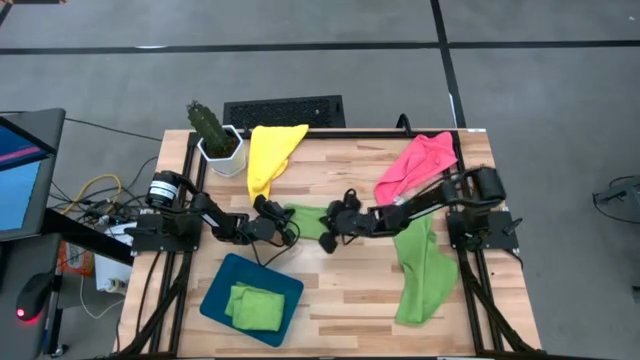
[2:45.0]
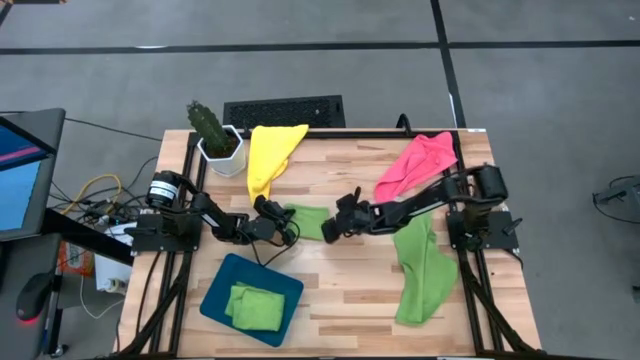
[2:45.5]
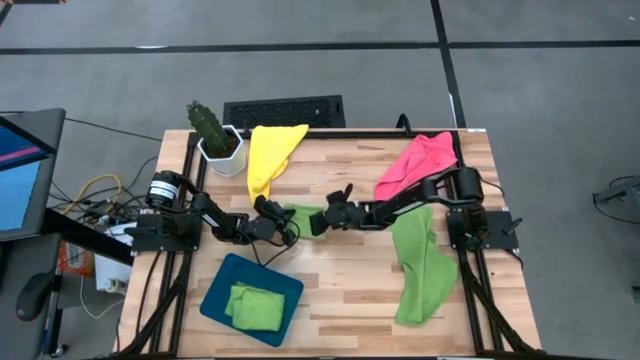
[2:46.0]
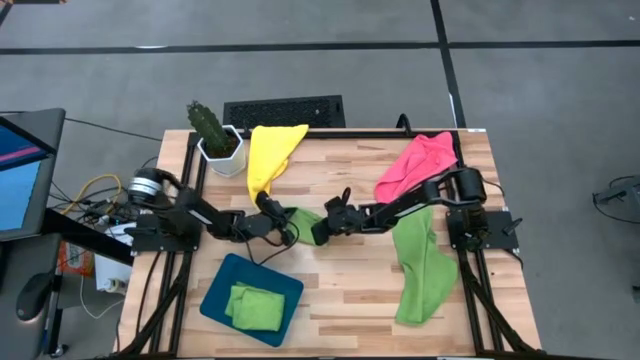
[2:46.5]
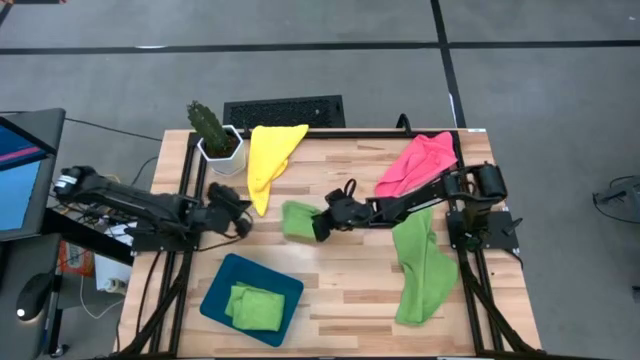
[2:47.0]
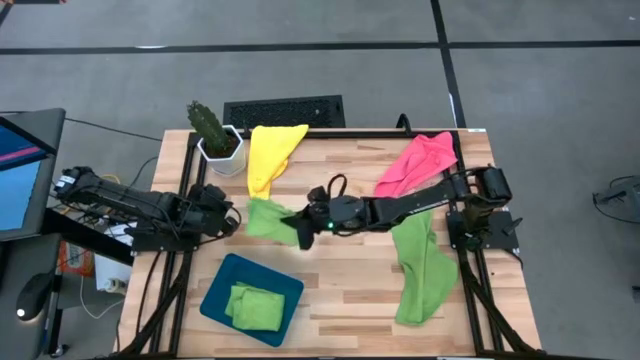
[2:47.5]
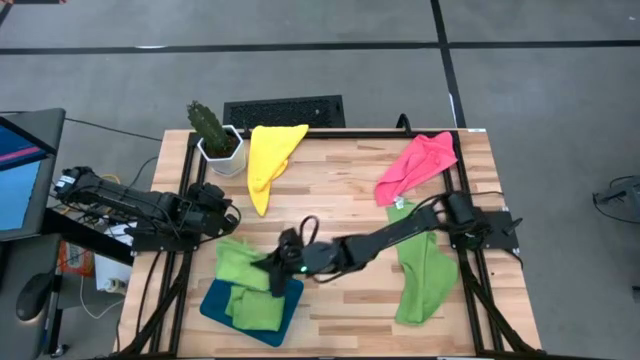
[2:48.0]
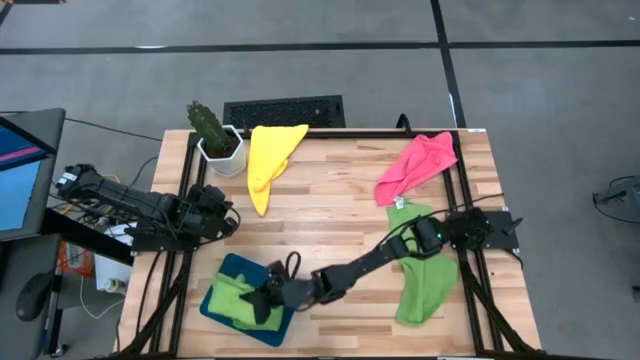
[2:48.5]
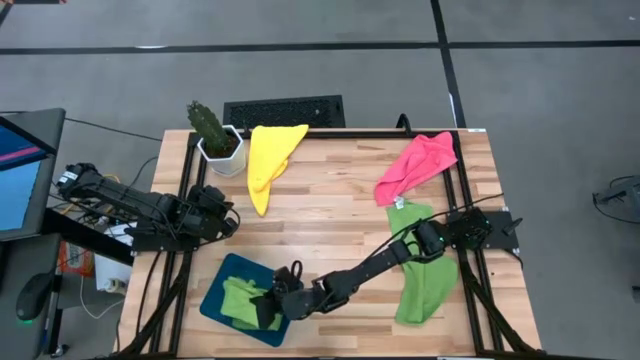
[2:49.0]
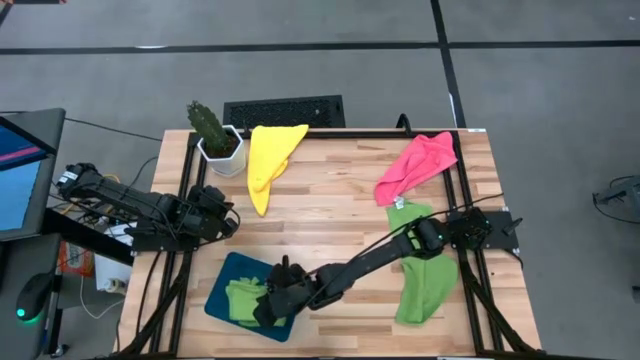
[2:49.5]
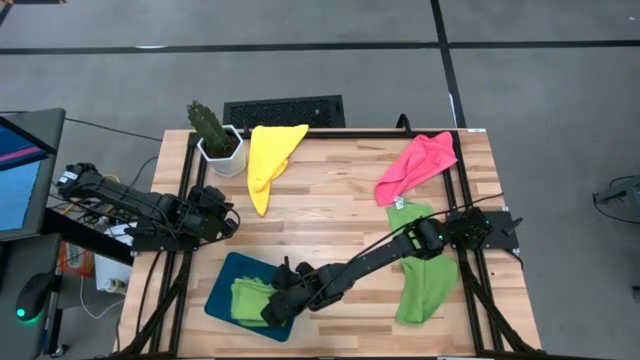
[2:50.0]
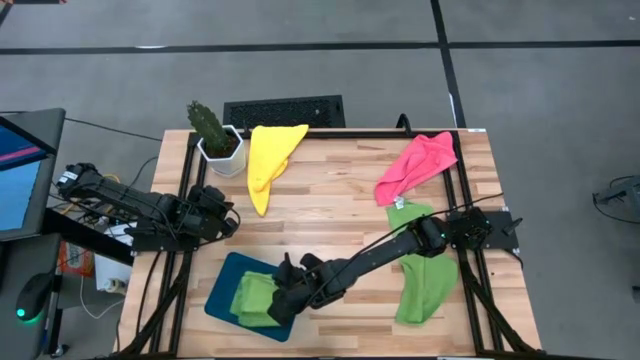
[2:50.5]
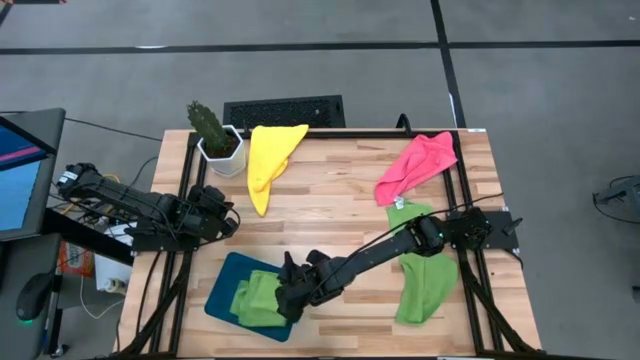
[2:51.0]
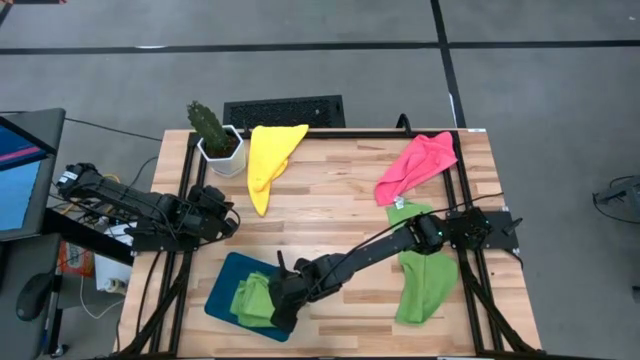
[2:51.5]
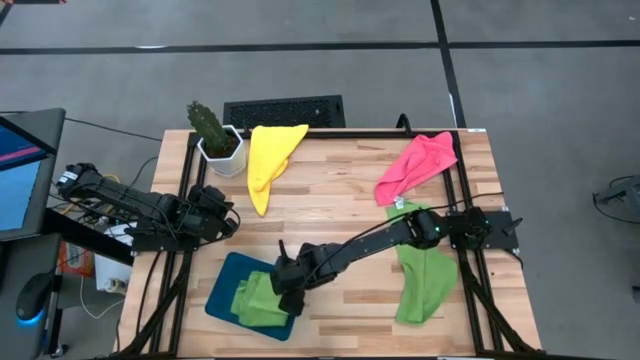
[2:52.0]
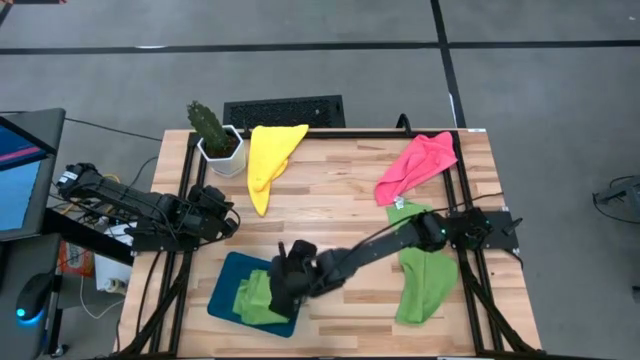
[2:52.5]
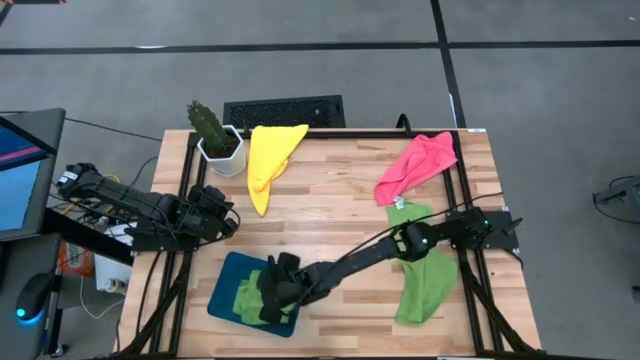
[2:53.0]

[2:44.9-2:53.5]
Task: Fold microfiber towels
Stack the top folded green microfiber on the green microfiber cloth in the blue bin

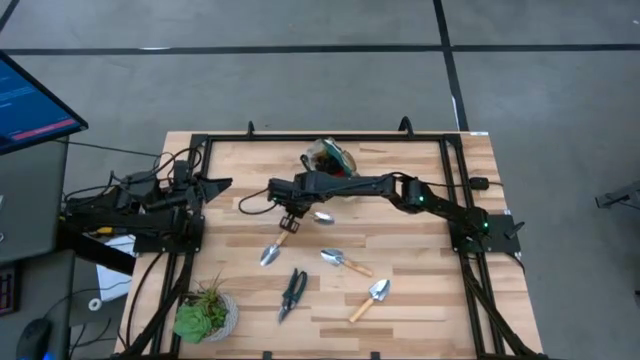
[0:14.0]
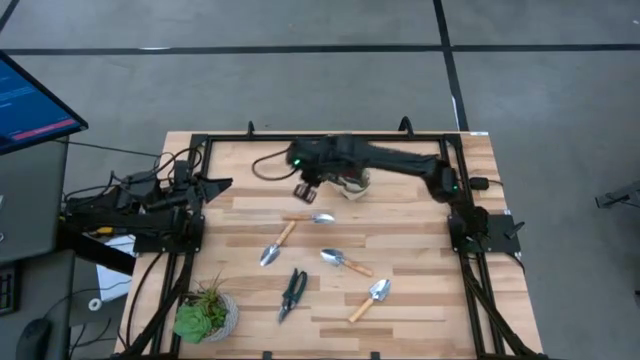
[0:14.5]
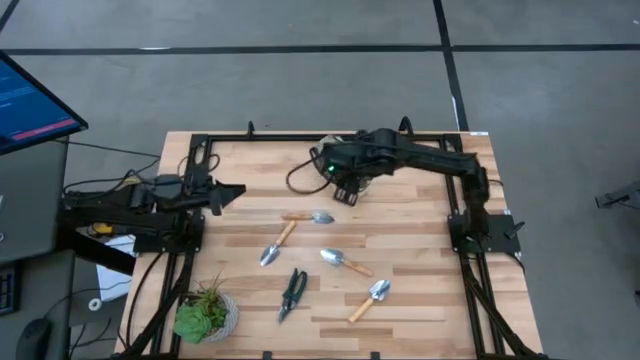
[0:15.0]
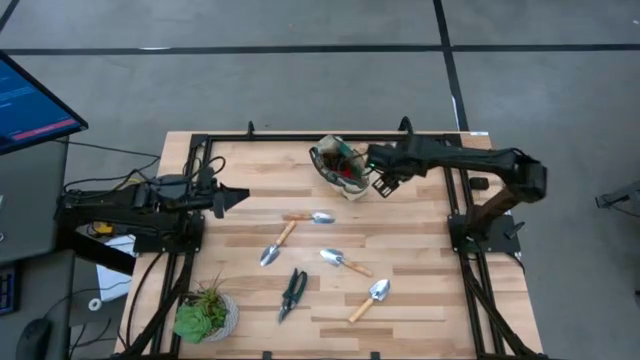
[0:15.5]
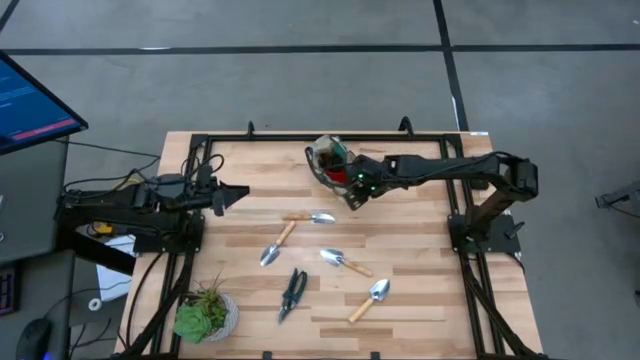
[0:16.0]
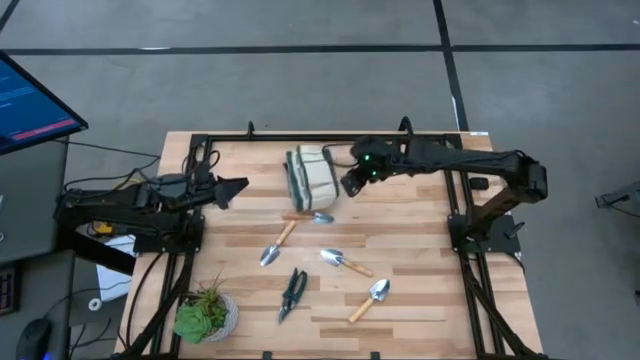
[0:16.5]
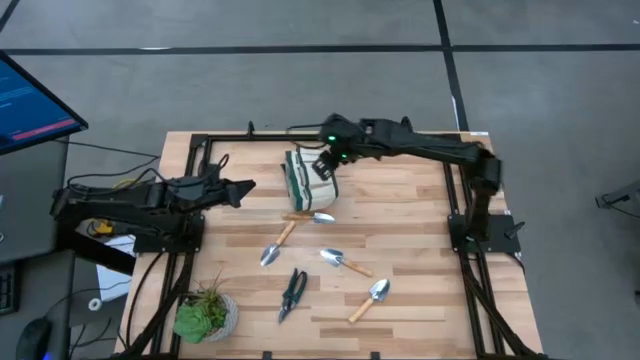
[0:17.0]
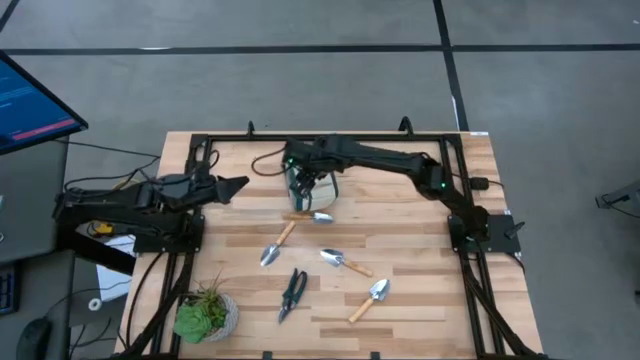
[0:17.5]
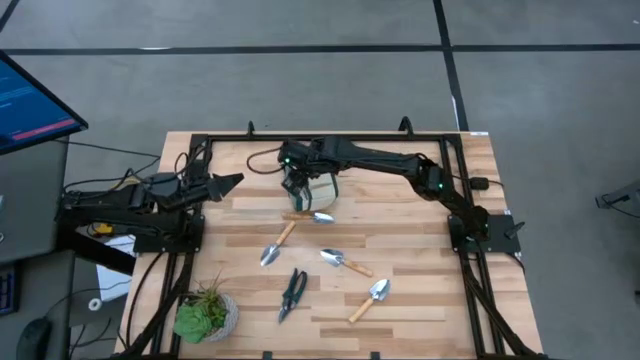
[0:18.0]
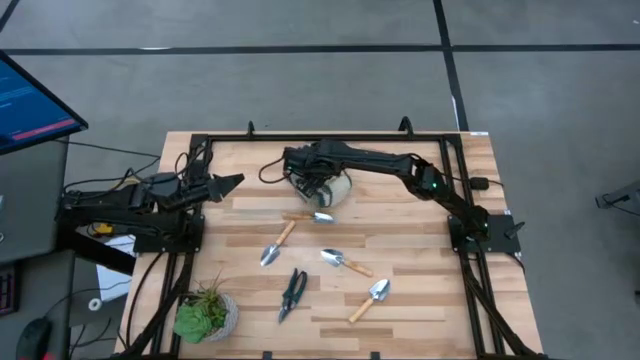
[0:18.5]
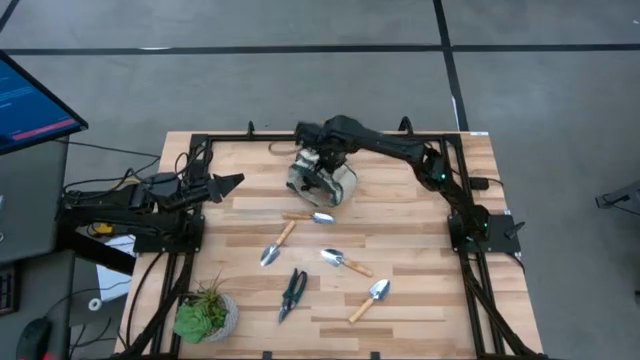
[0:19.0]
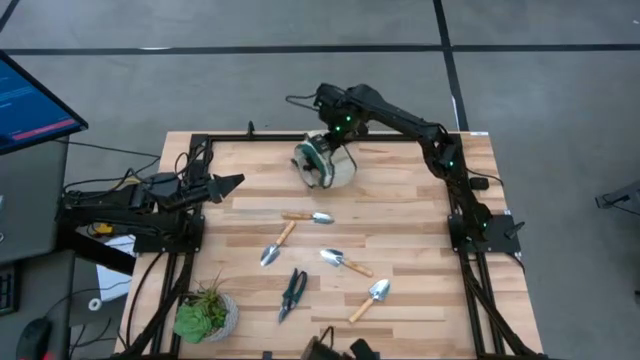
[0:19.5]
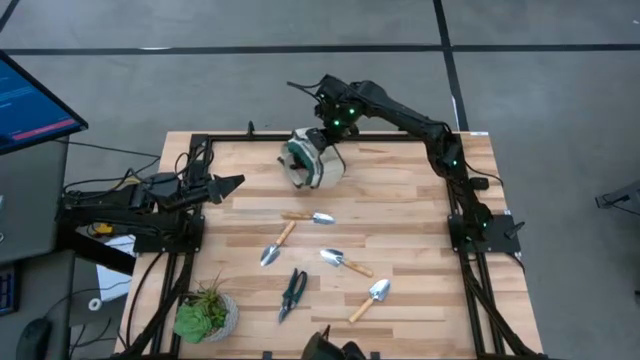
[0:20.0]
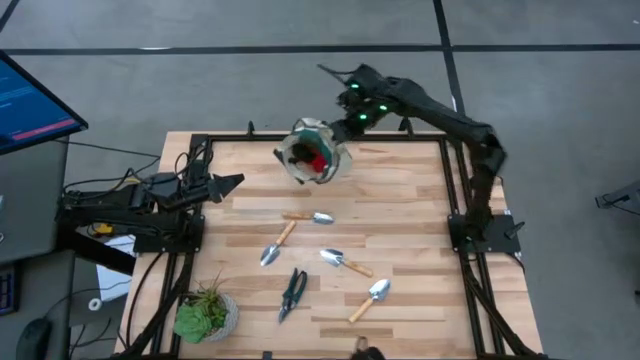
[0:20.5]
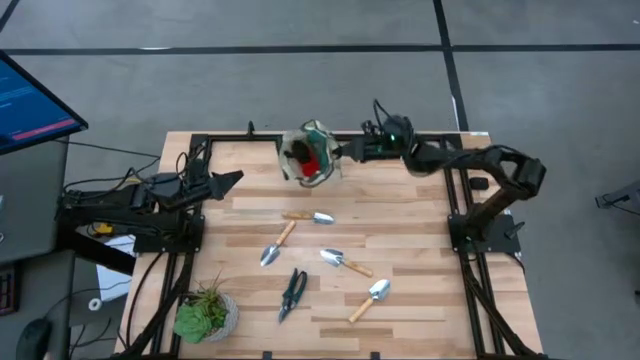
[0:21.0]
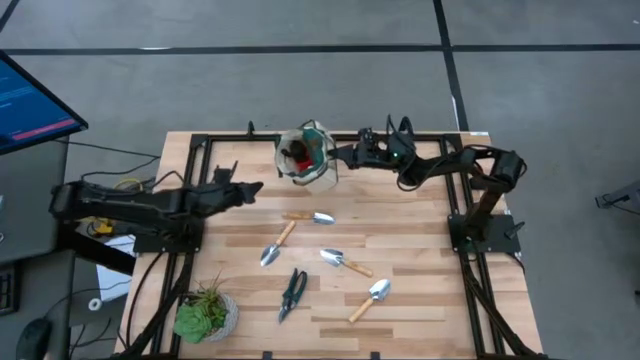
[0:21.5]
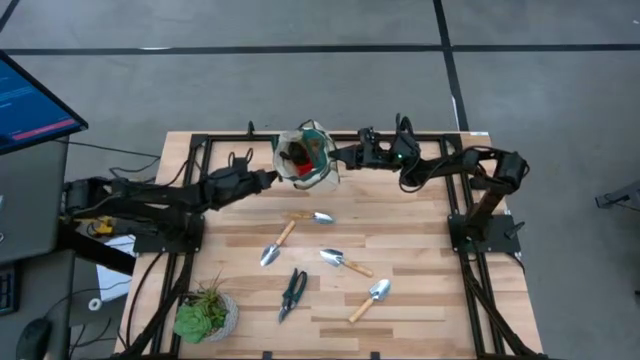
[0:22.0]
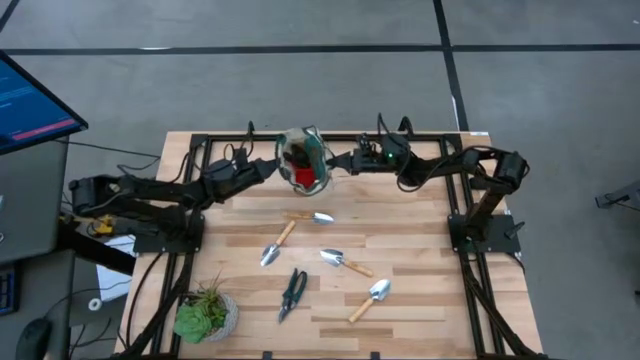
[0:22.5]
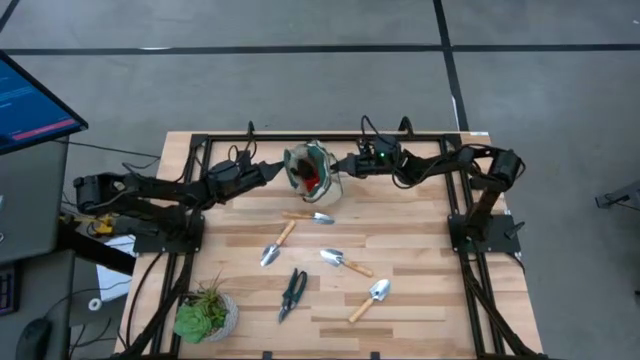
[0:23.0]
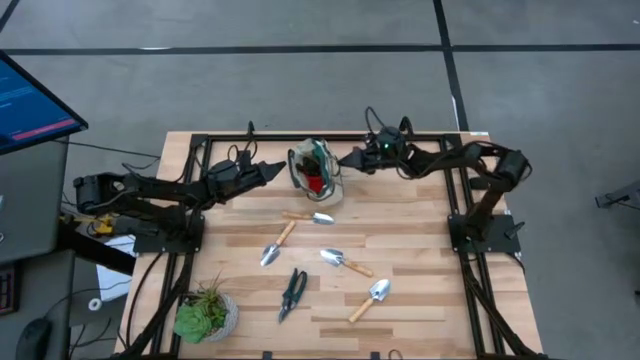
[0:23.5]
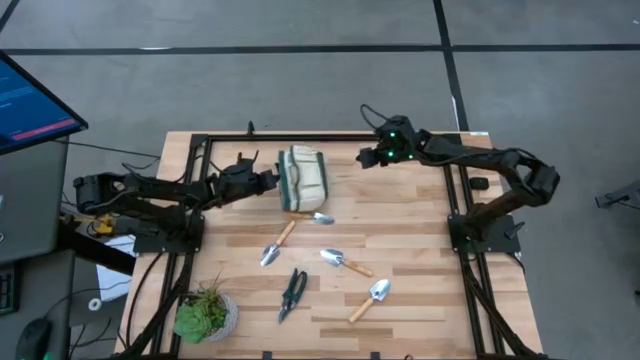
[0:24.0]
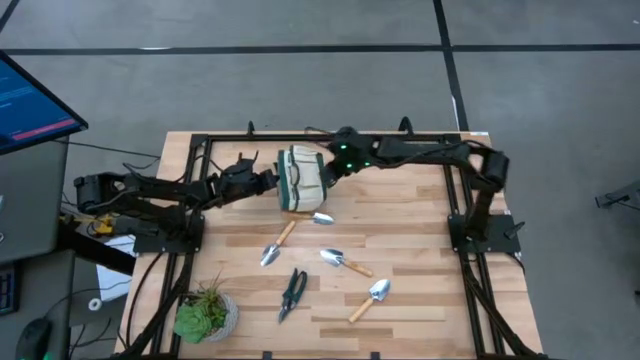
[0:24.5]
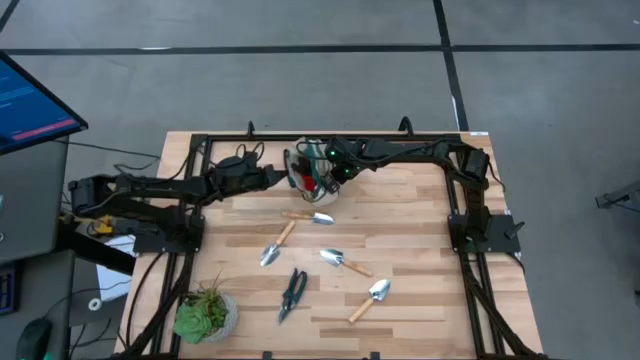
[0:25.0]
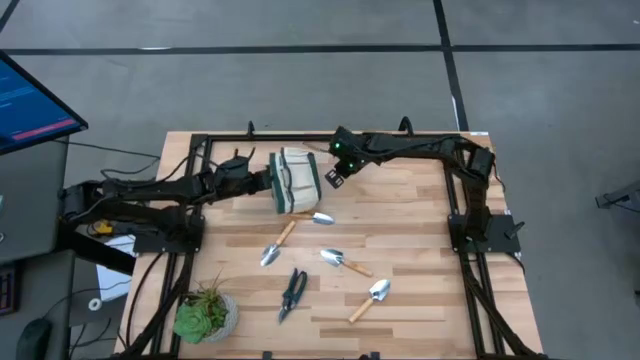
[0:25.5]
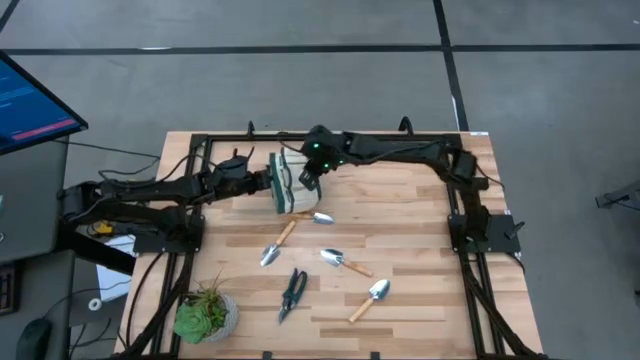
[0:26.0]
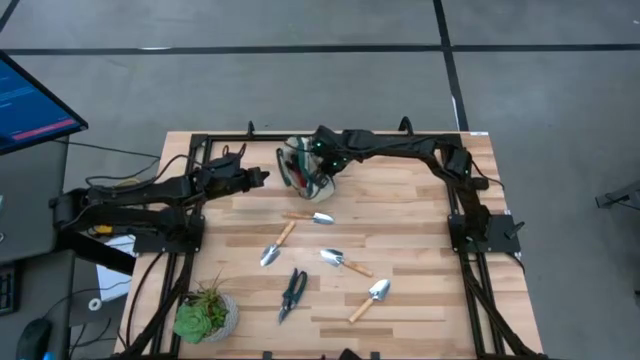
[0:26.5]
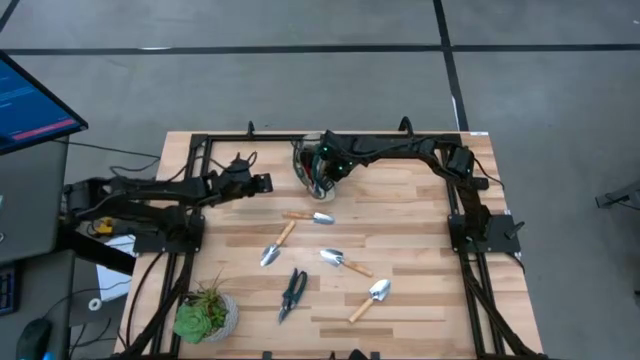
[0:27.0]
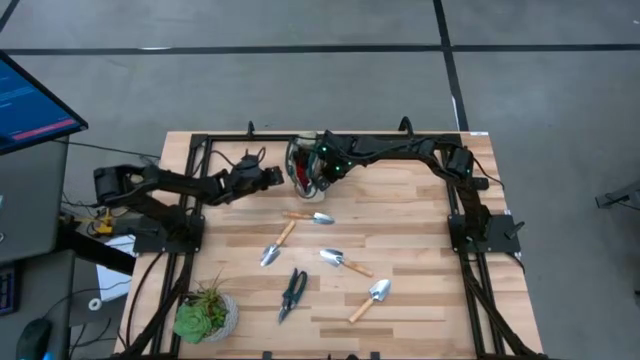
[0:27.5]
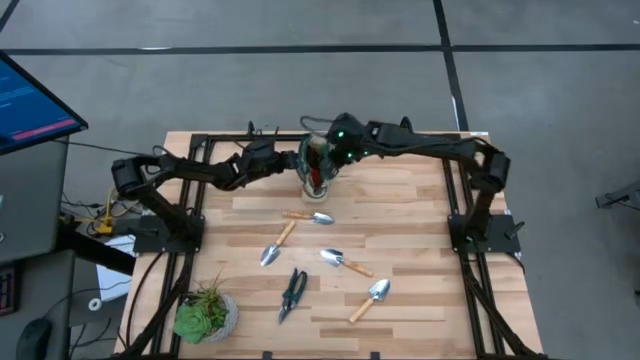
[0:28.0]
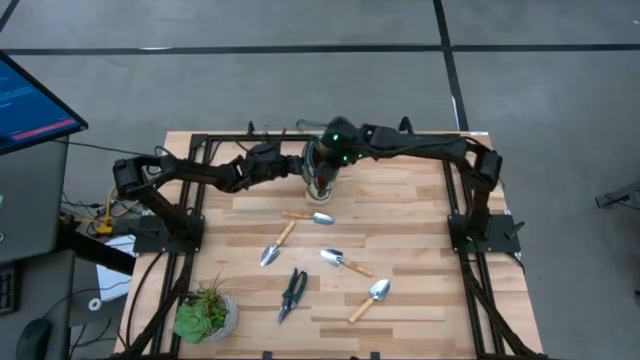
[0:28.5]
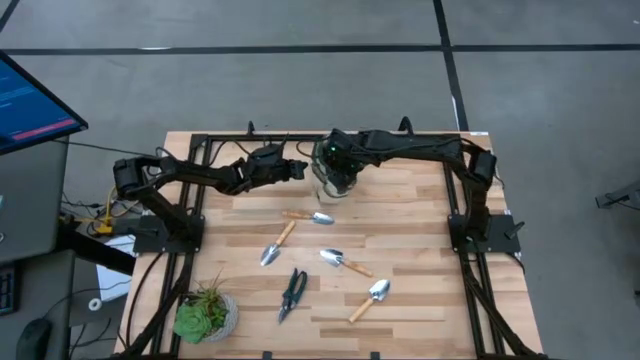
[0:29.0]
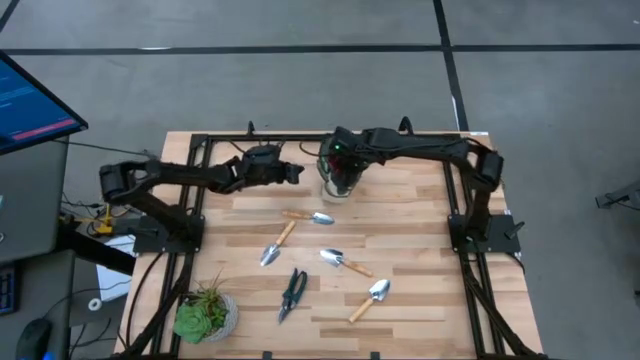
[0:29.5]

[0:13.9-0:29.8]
Task: Pick & Place Garden tools in Gardening bag
Adjust the gardening bag
